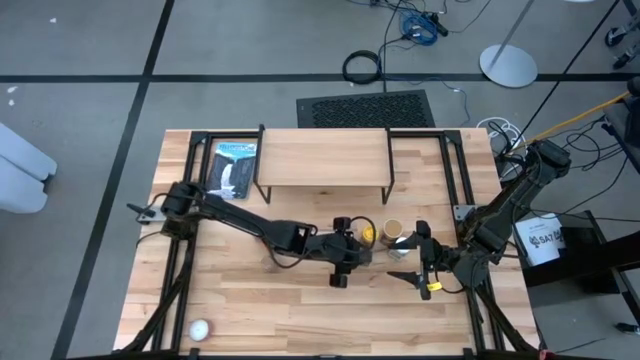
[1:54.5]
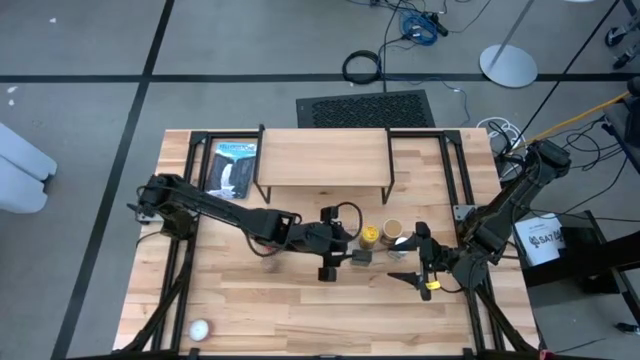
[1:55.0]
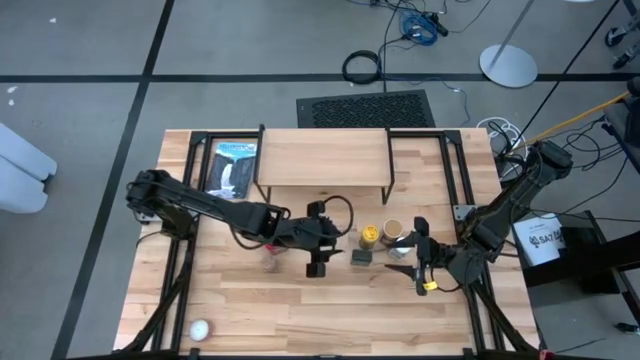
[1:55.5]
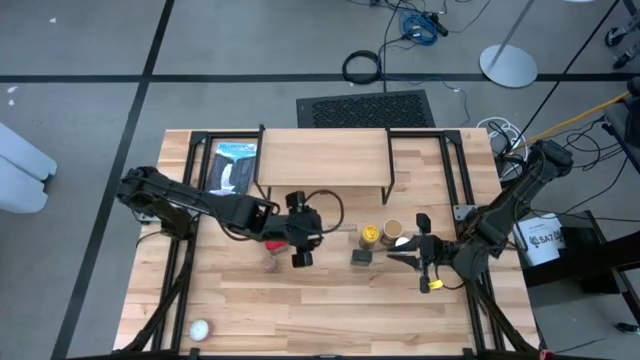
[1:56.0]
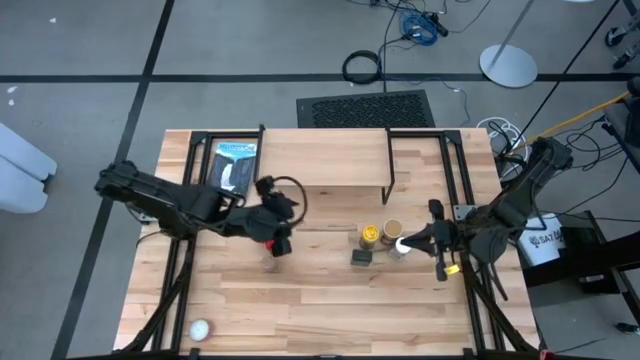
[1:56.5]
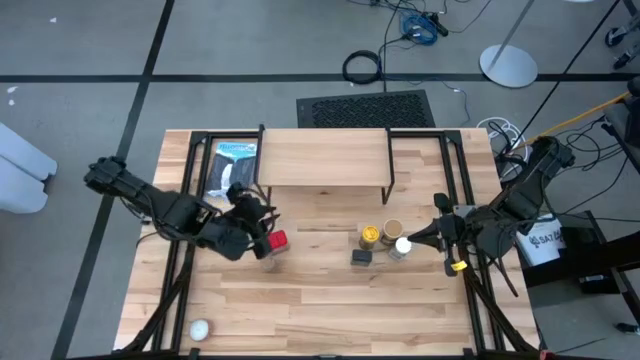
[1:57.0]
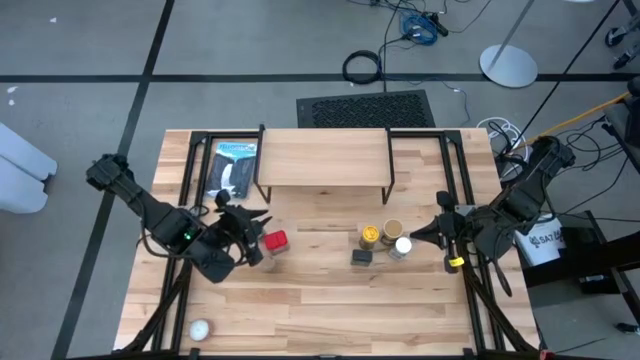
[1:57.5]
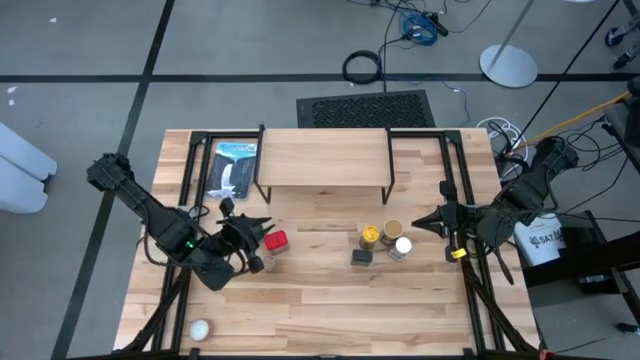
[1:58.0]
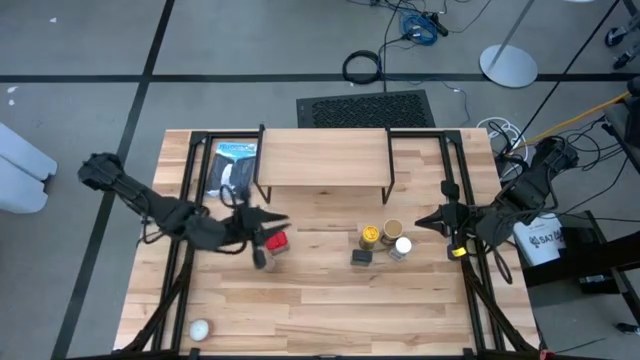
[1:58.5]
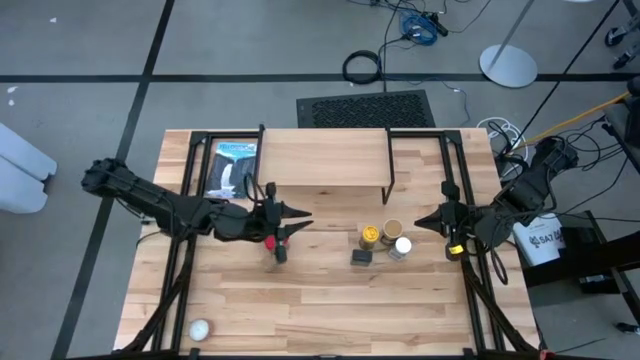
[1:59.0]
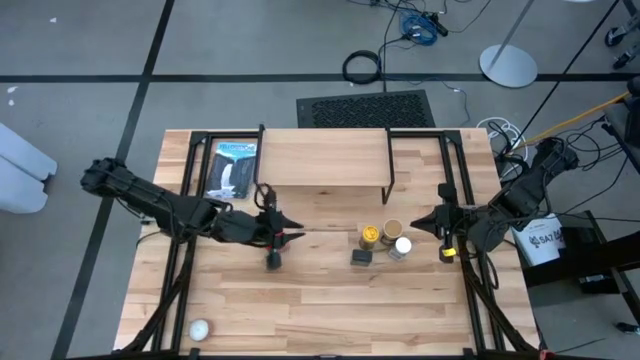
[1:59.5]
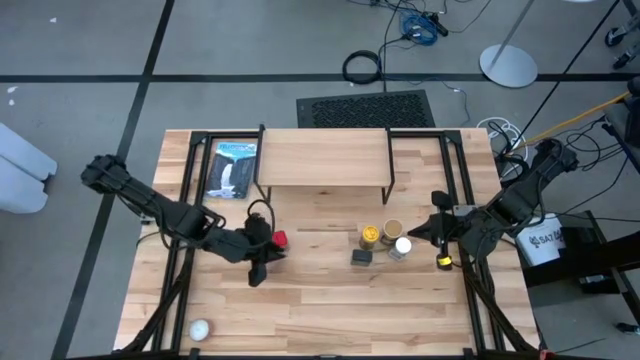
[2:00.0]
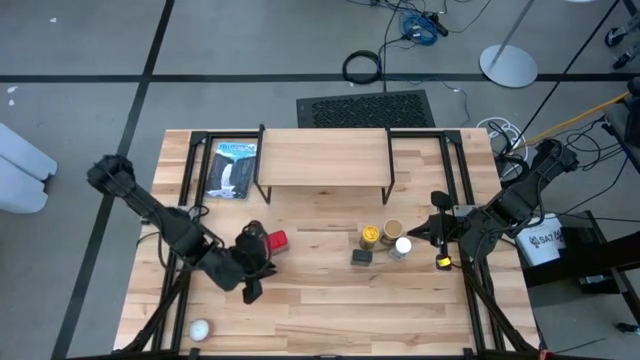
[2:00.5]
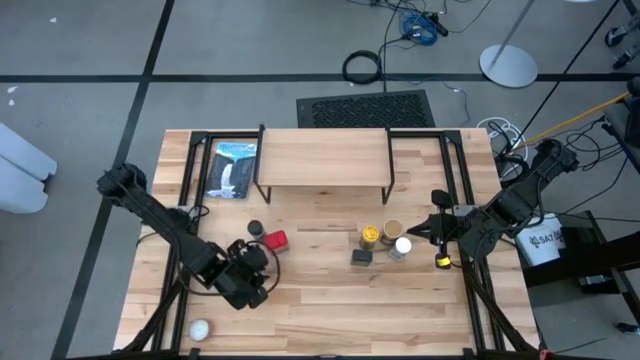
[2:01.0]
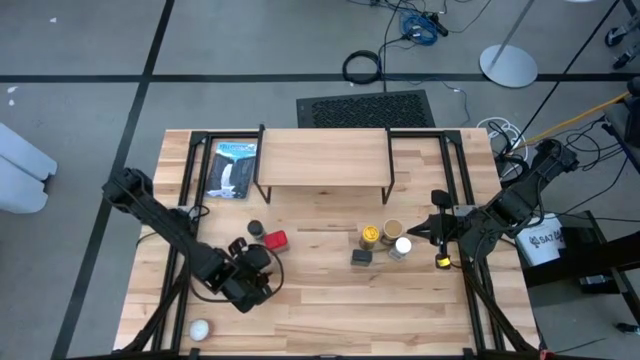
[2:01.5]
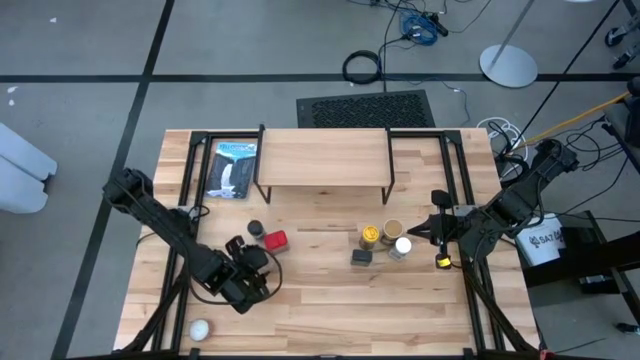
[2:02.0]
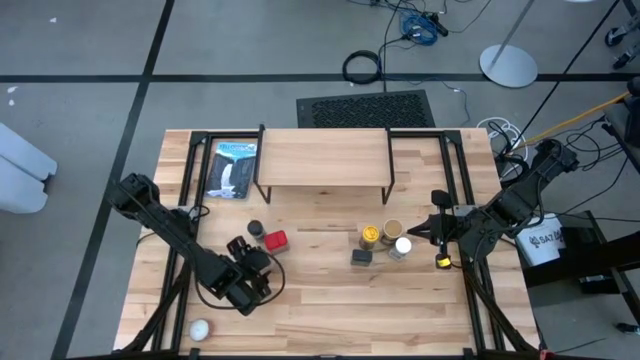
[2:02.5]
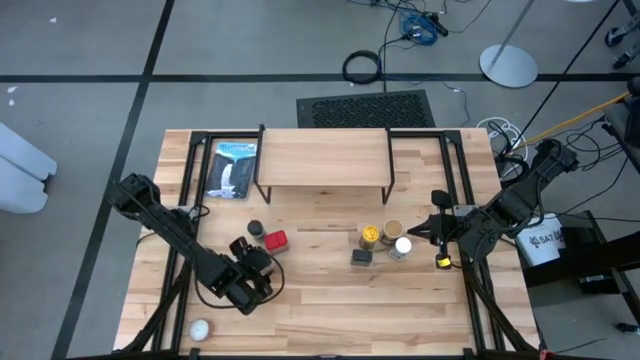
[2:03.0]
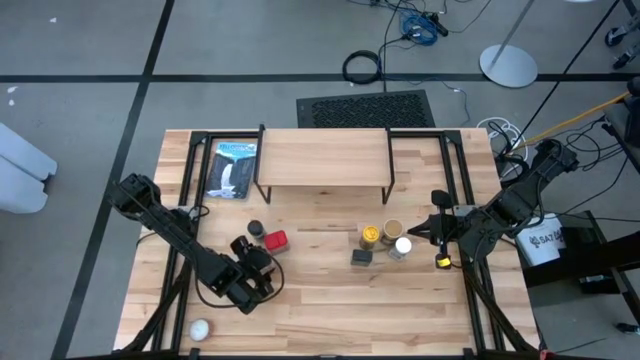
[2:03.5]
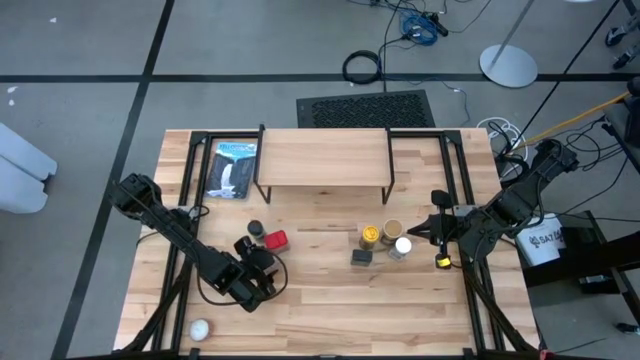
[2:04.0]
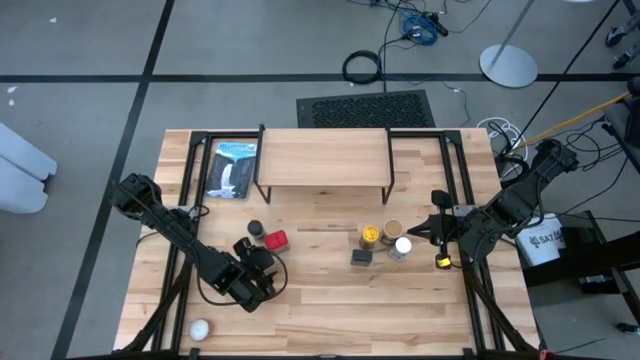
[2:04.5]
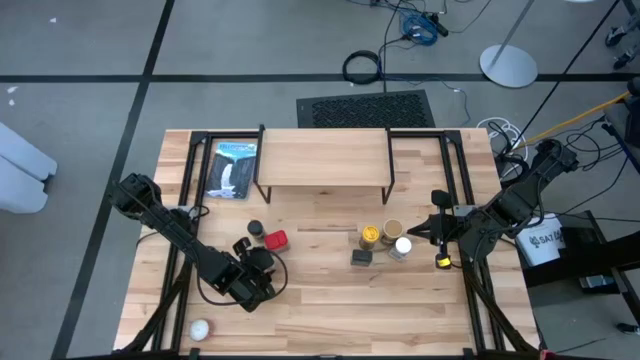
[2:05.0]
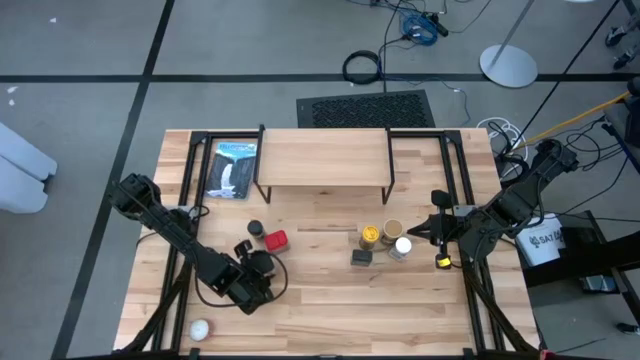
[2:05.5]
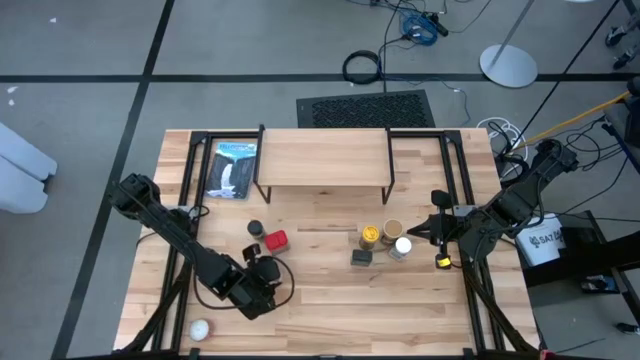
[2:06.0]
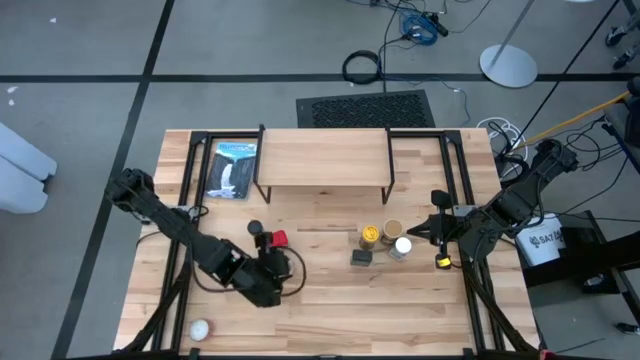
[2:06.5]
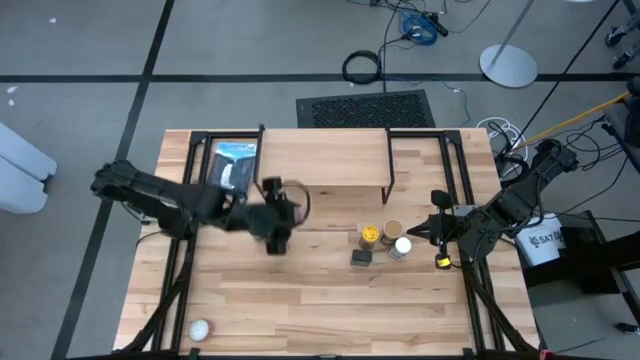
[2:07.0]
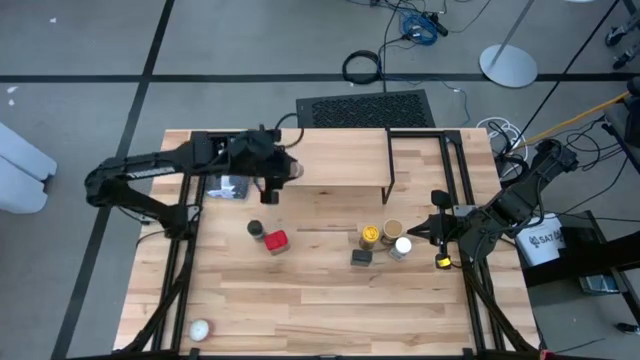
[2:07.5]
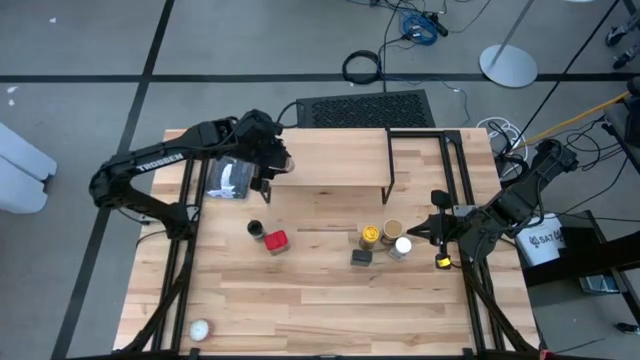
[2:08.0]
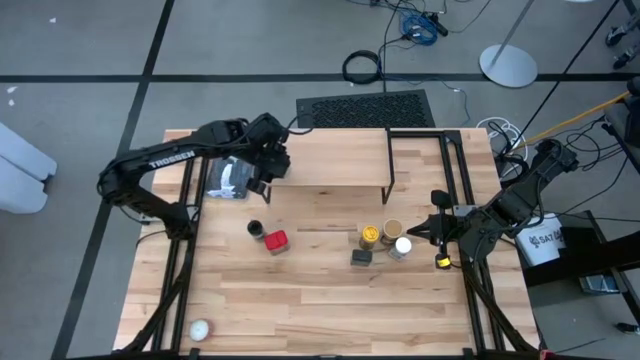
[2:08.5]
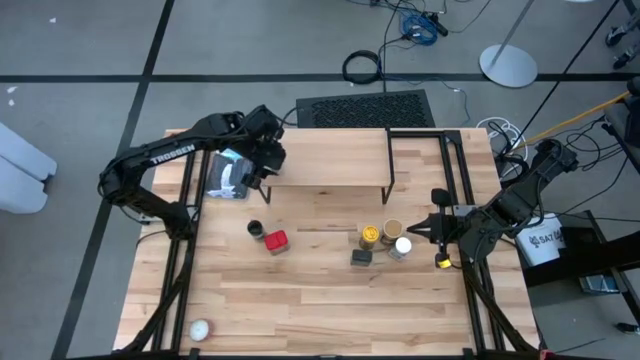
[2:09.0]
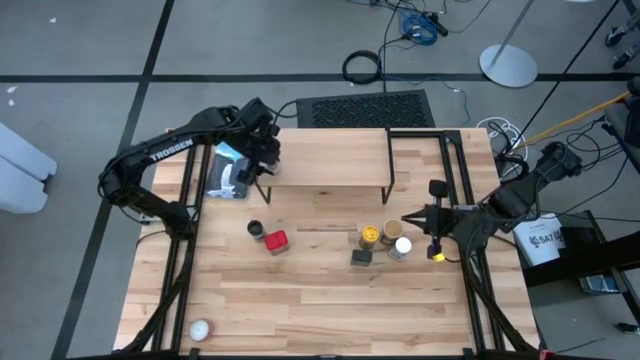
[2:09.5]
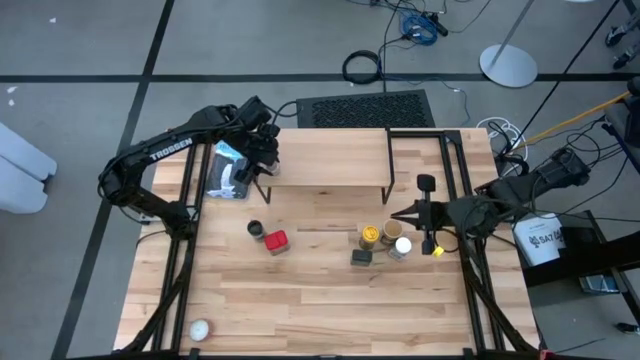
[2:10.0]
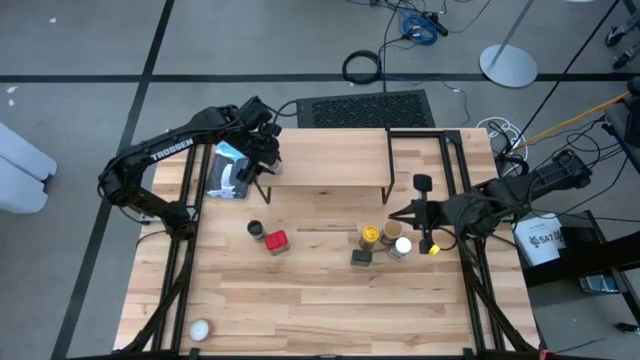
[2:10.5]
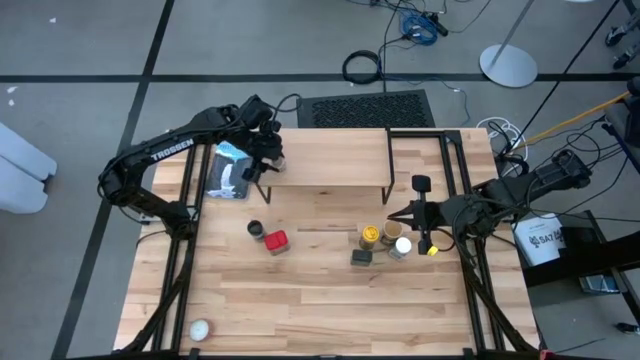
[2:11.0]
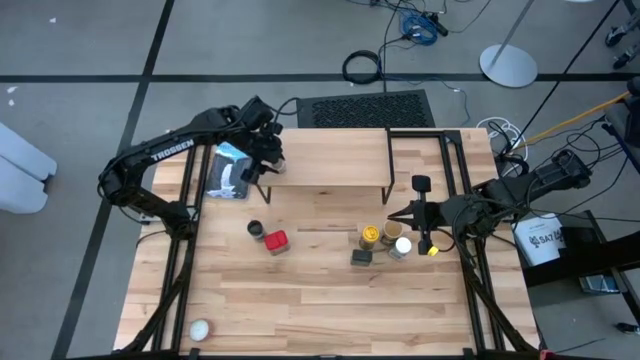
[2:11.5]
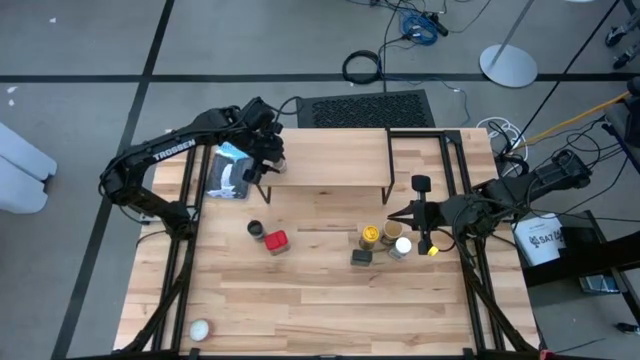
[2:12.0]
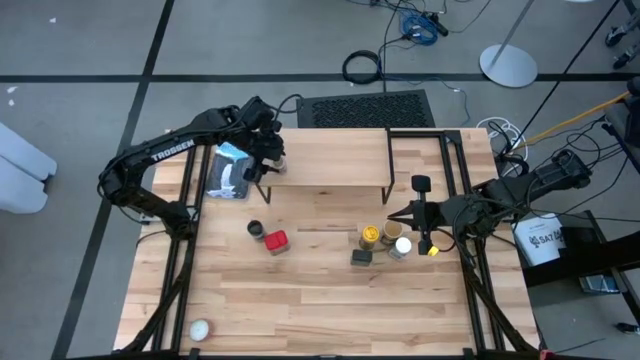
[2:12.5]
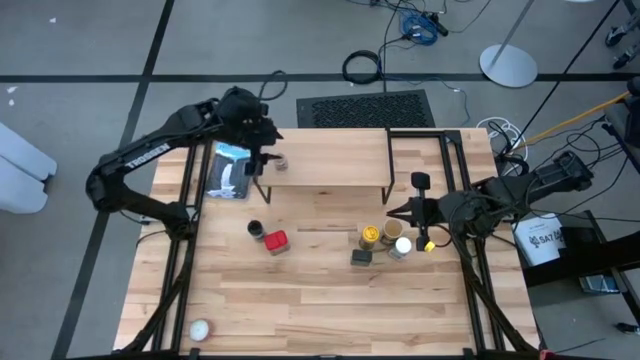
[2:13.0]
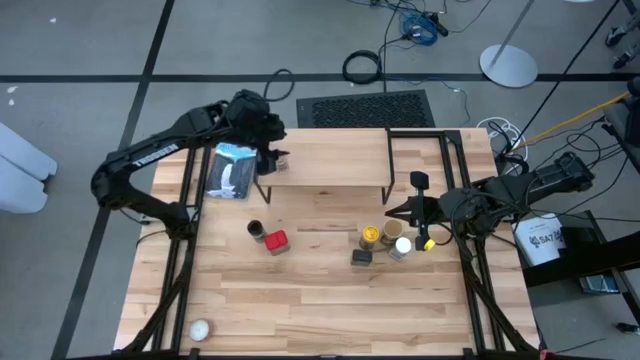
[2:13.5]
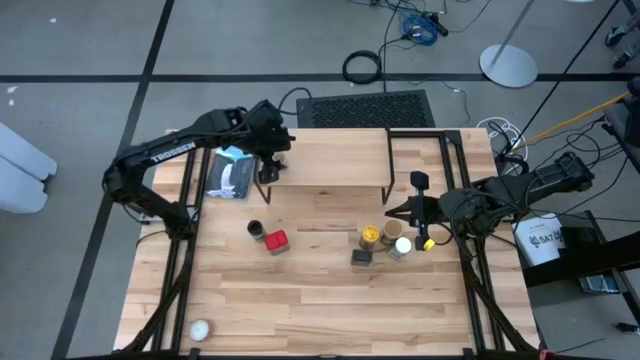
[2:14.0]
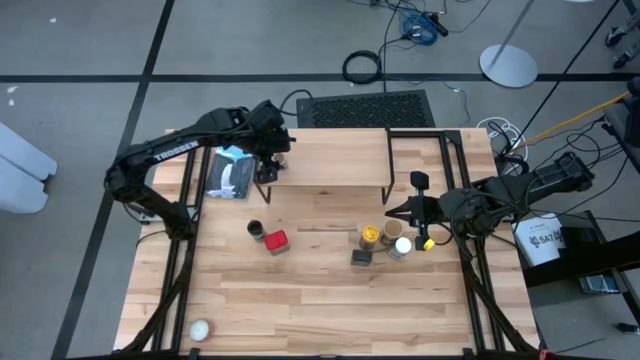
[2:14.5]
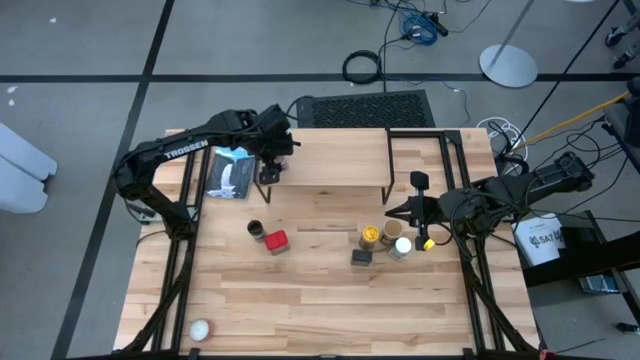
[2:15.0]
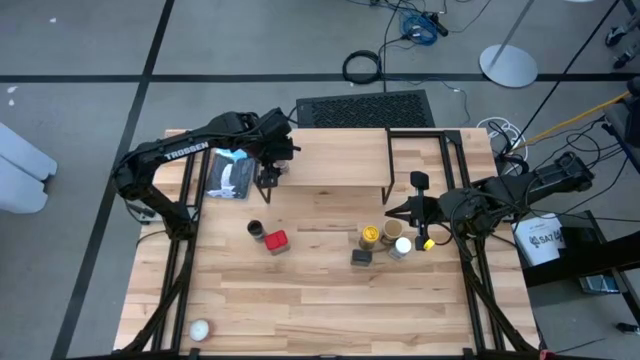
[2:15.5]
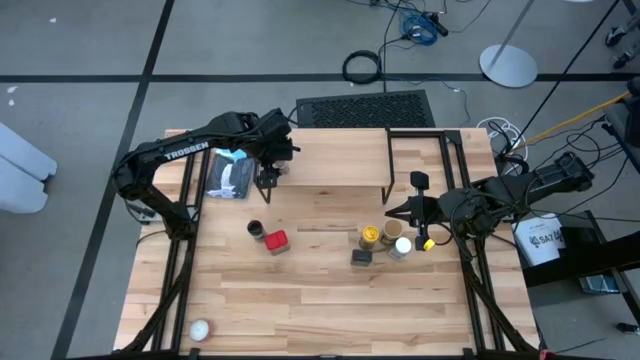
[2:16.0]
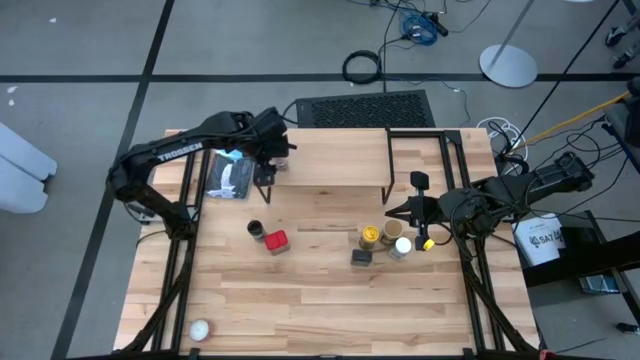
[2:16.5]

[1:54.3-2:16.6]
Task: Shelf spices
Put the brown seasoning bottle on the shelf
